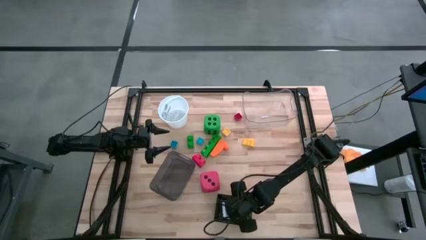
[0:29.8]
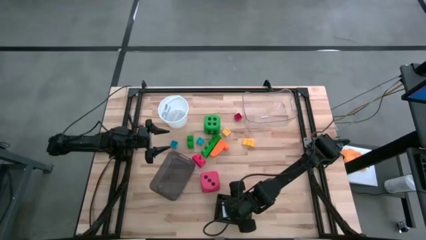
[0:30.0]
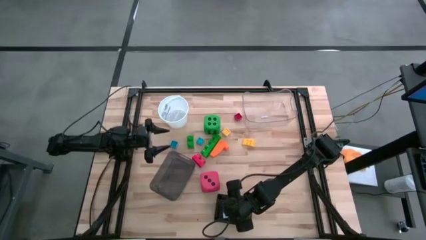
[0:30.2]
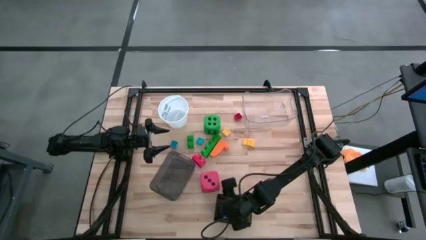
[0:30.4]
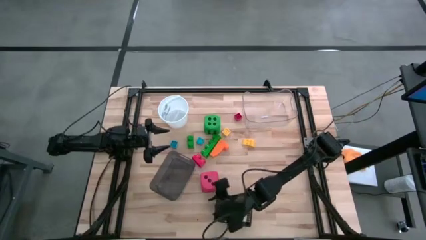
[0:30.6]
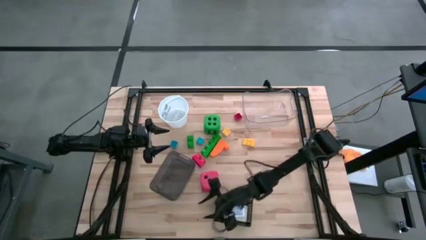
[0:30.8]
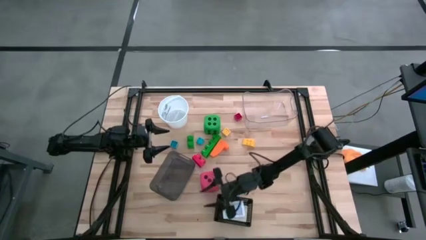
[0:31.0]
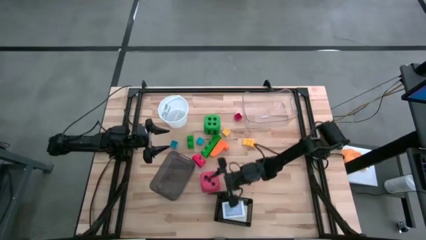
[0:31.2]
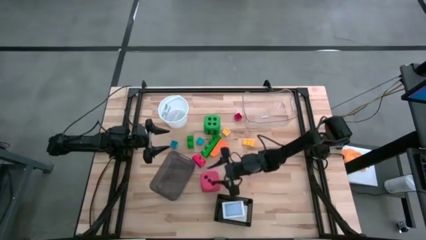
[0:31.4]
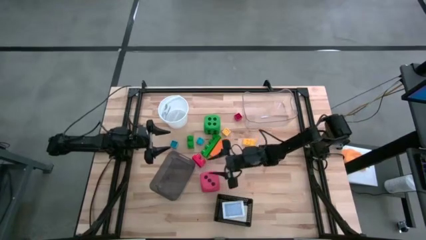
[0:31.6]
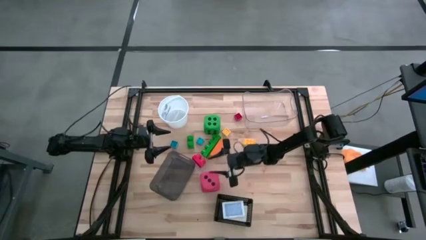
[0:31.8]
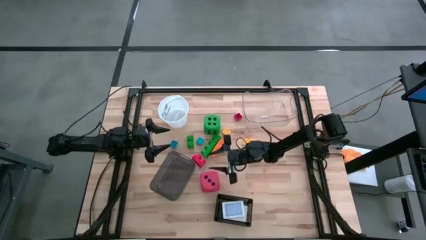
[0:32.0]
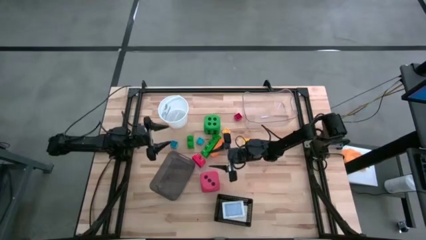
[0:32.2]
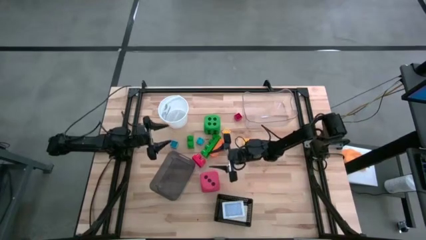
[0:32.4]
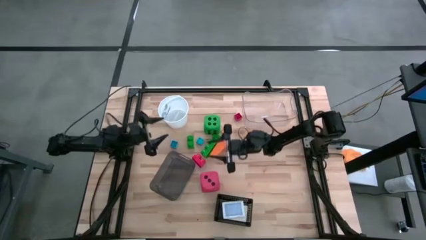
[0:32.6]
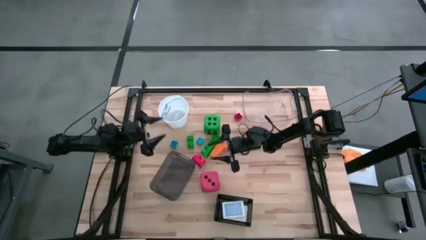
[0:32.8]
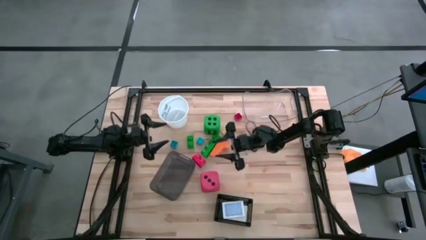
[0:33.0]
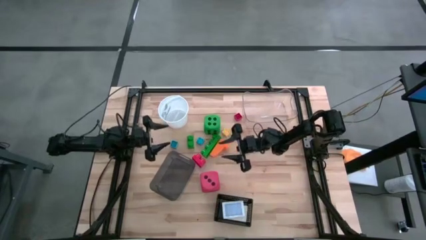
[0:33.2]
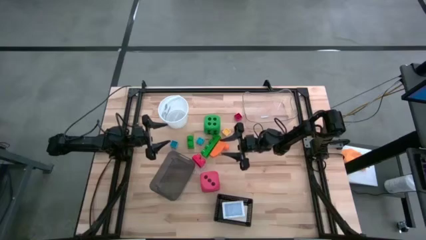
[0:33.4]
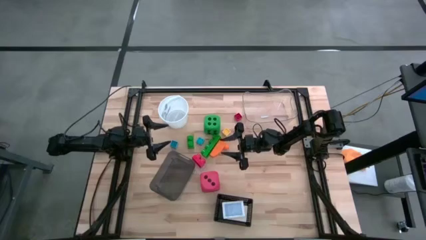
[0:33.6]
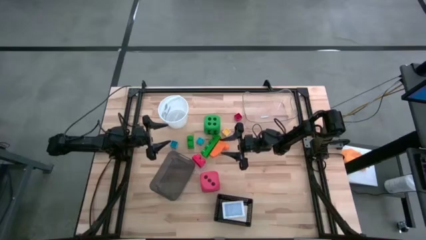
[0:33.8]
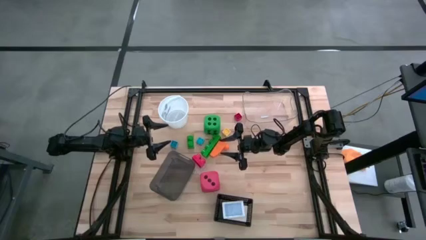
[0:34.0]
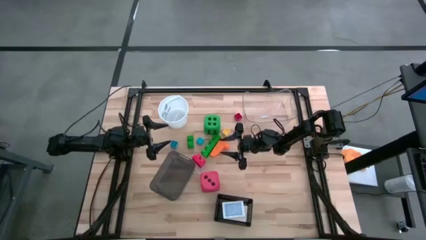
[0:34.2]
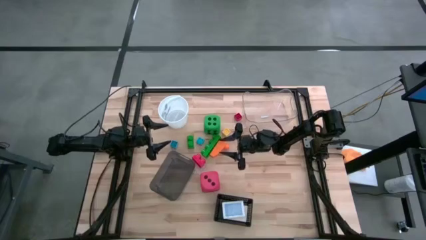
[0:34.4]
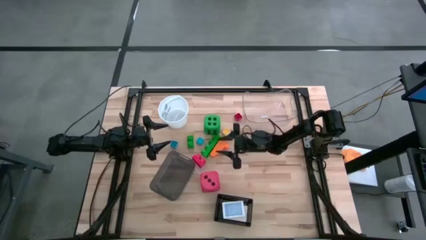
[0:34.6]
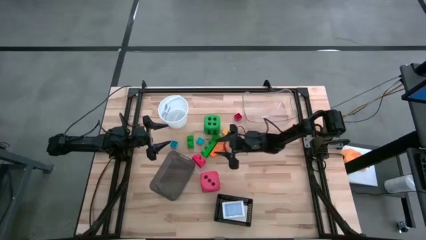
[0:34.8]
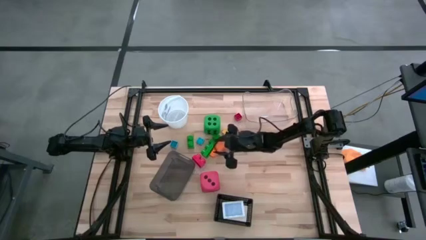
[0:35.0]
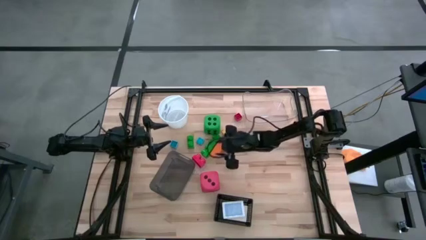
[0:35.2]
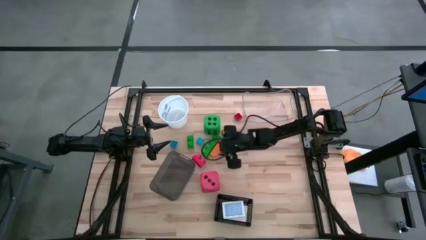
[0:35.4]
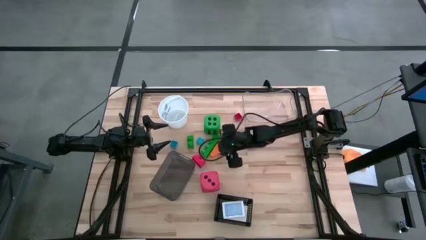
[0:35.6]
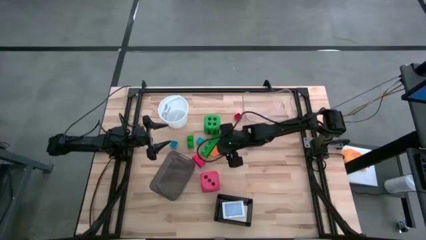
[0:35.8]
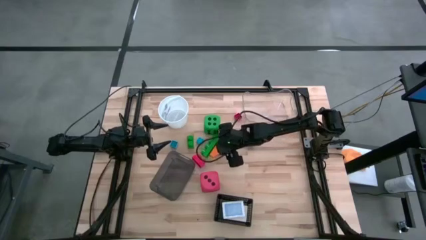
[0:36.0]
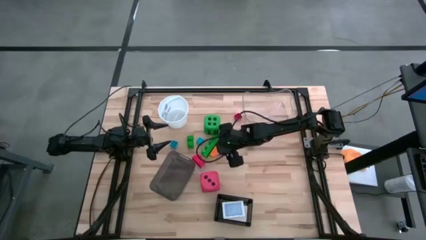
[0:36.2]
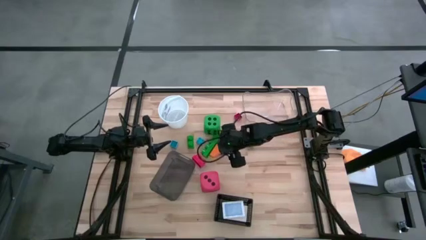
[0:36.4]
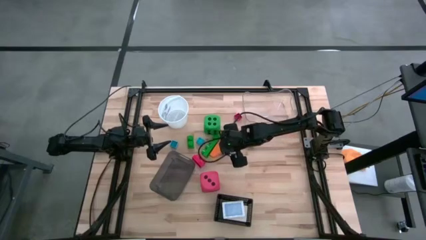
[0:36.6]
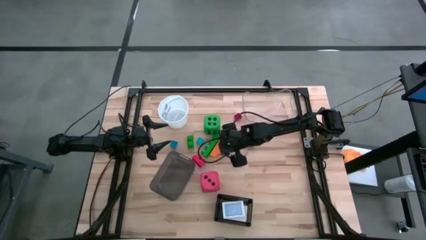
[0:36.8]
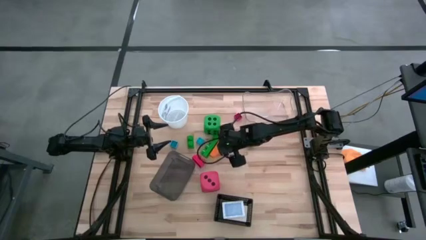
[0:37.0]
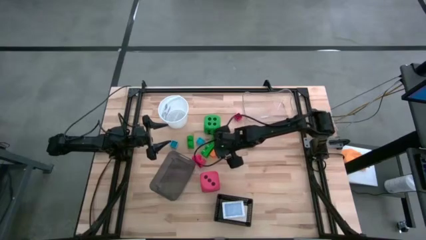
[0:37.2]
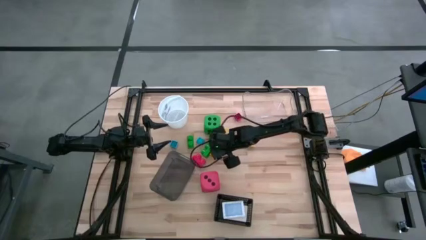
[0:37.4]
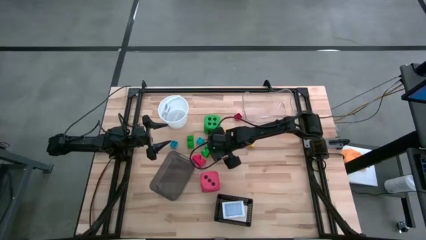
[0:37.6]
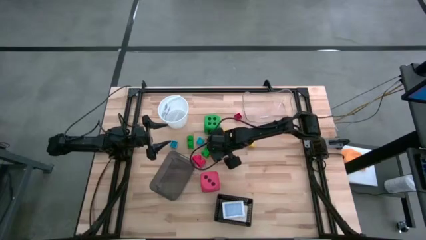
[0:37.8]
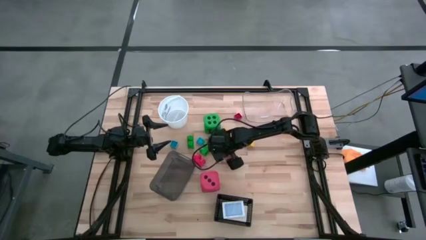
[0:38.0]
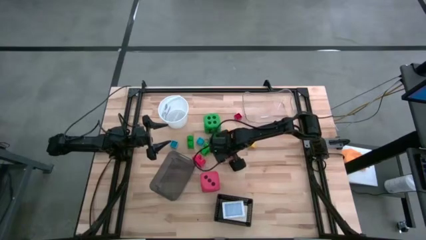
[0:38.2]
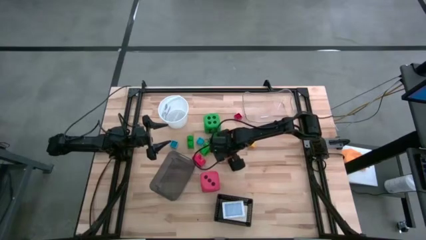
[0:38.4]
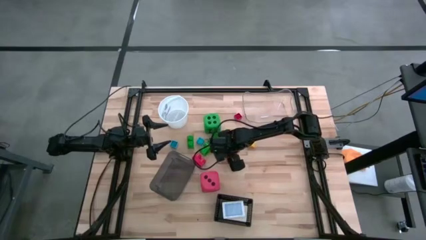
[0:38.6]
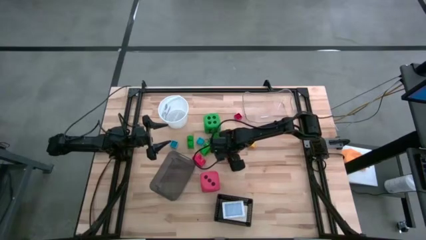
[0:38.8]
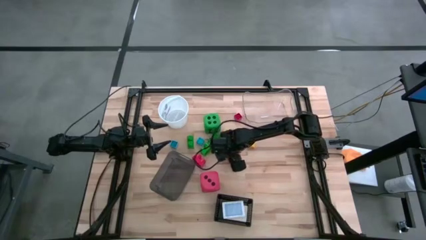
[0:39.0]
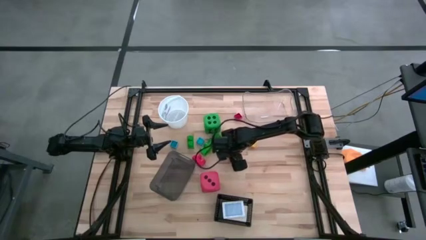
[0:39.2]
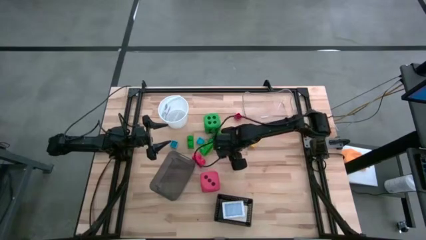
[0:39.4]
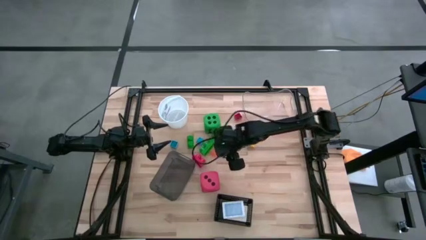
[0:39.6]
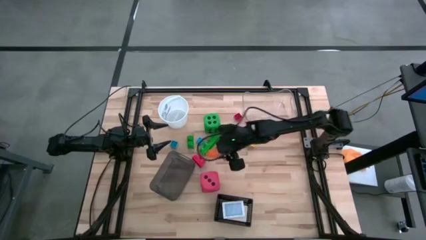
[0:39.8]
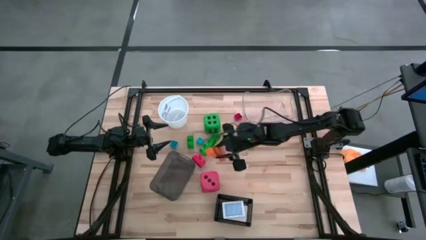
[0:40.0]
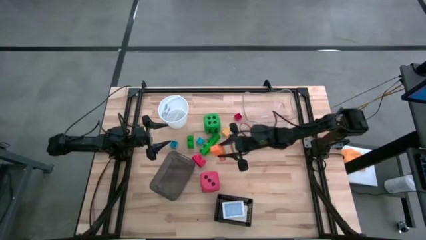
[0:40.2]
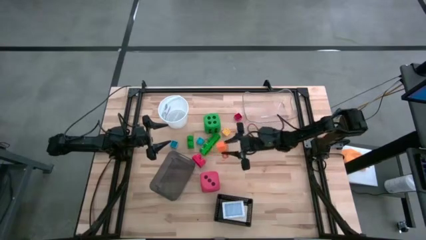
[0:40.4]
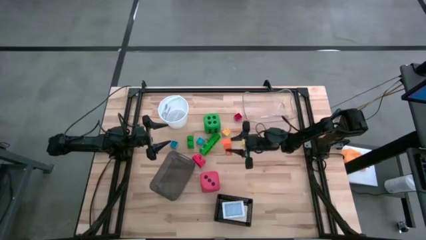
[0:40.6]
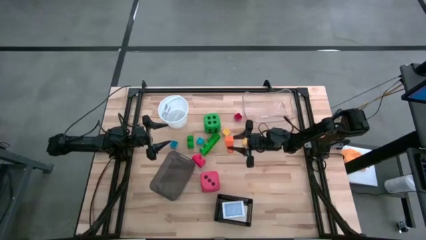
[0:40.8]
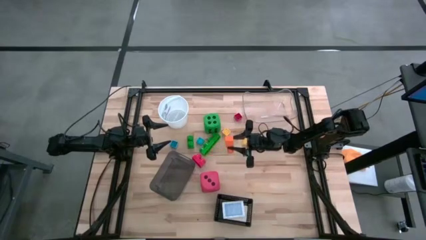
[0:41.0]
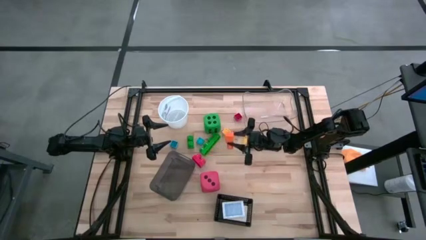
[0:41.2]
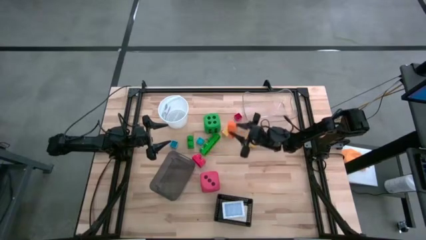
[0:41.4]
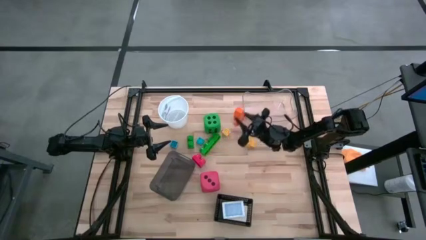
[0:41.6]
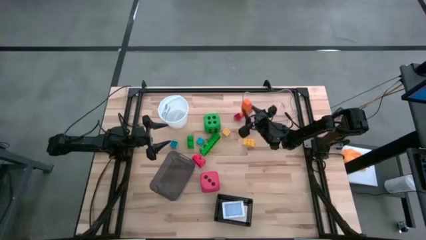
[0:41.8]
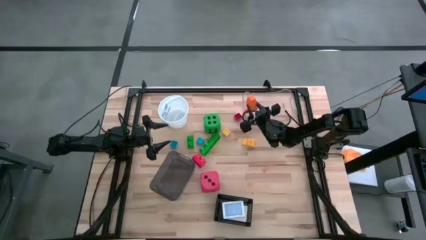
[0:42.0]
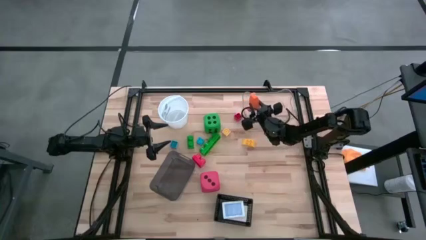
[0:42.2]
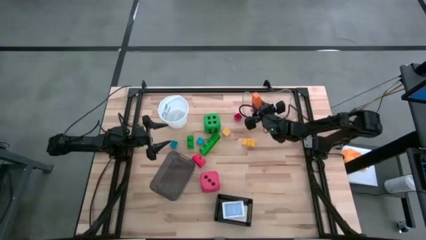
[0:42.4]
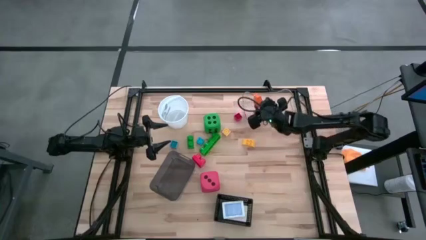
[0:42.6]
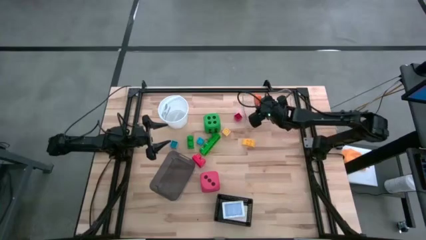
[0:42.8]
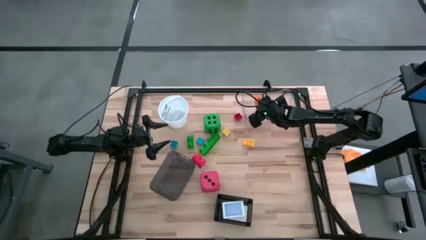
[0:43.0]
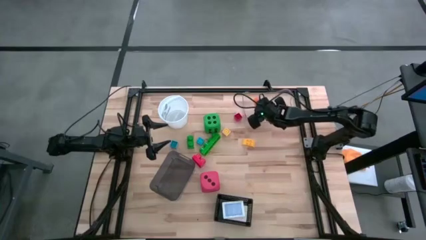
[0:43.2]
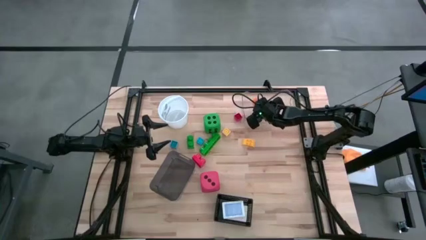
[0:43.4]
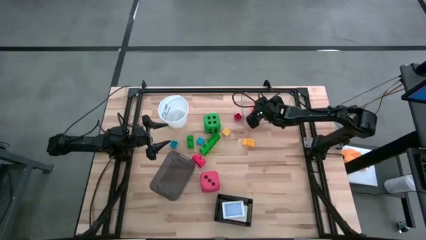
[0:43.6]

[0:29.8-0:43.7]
Task: Pick & Place Toys
Put the orange game piece into the transparent bin

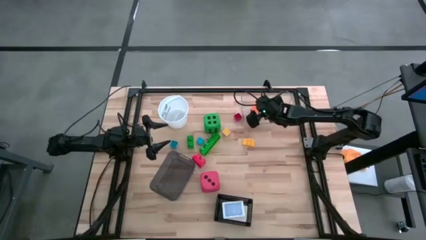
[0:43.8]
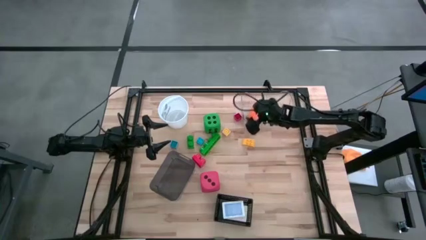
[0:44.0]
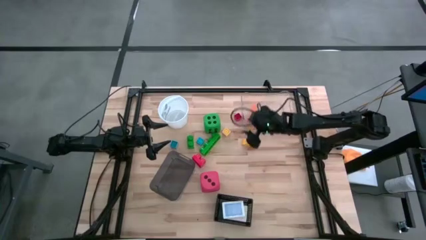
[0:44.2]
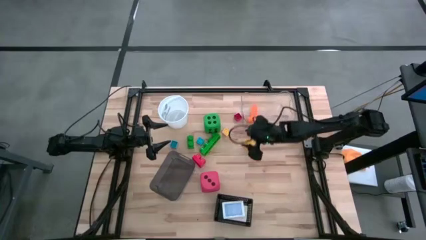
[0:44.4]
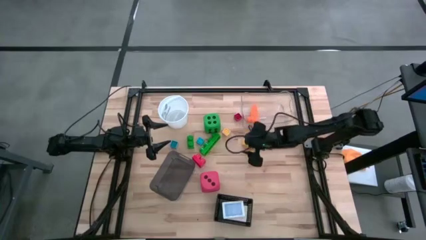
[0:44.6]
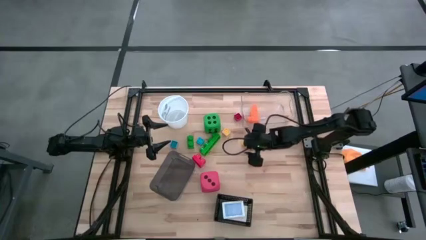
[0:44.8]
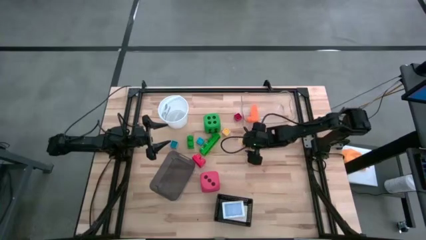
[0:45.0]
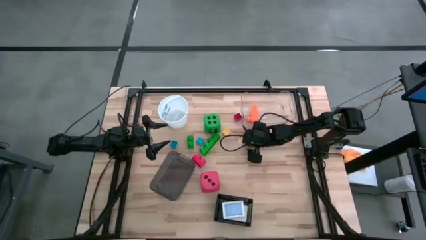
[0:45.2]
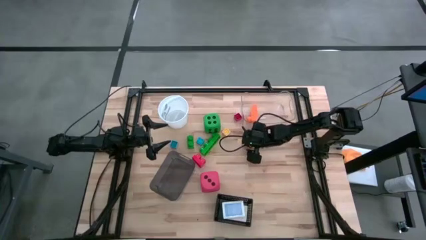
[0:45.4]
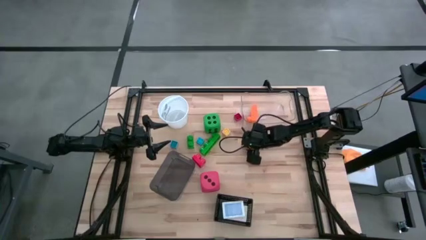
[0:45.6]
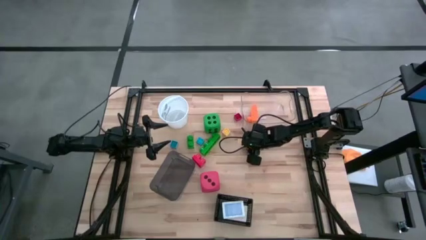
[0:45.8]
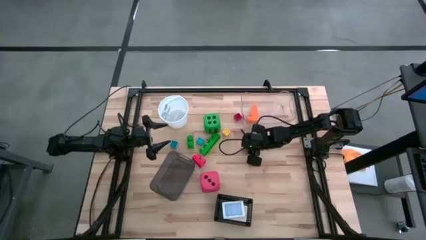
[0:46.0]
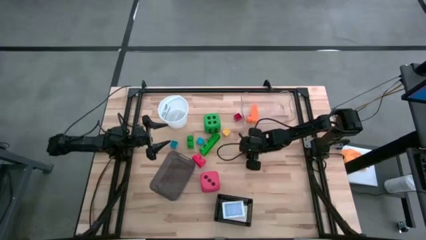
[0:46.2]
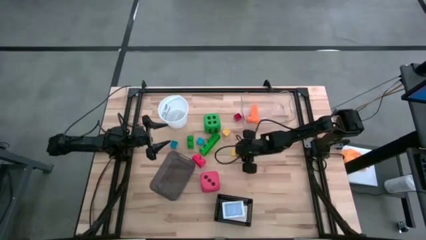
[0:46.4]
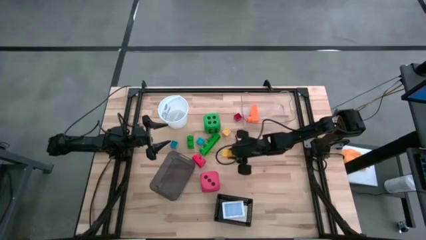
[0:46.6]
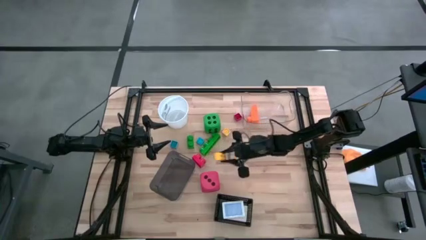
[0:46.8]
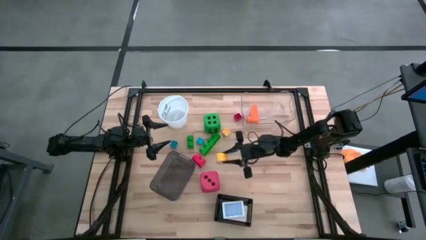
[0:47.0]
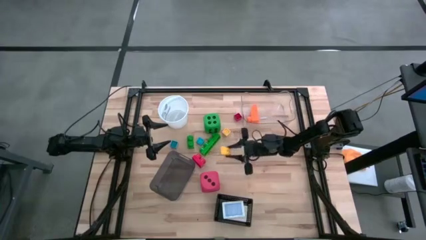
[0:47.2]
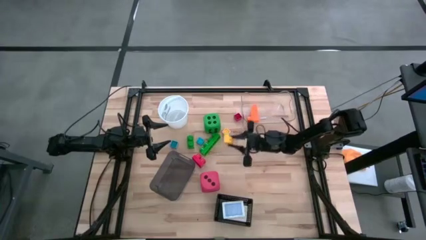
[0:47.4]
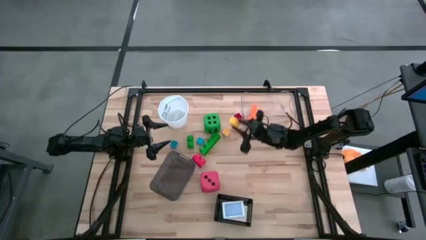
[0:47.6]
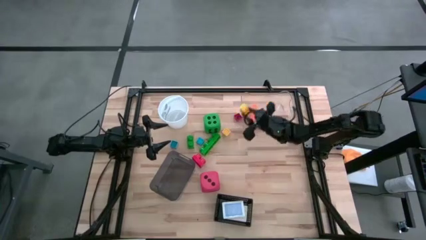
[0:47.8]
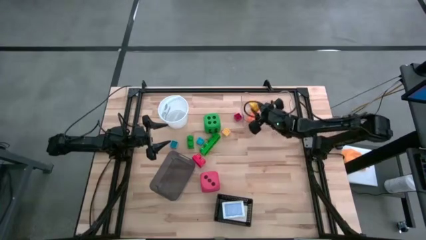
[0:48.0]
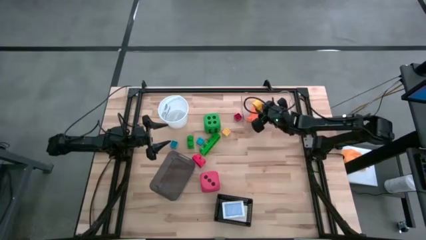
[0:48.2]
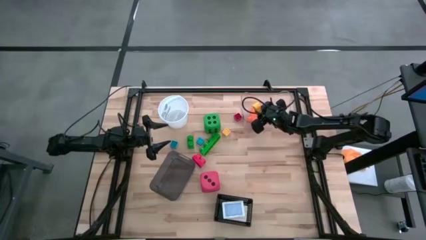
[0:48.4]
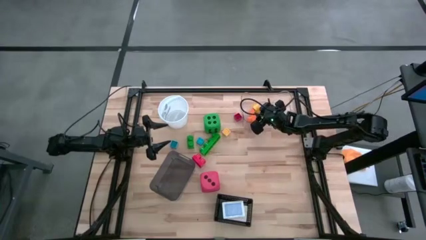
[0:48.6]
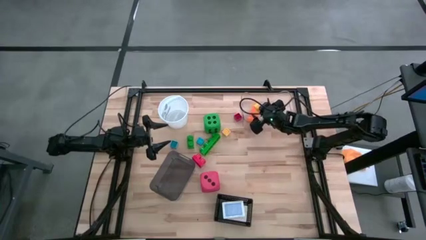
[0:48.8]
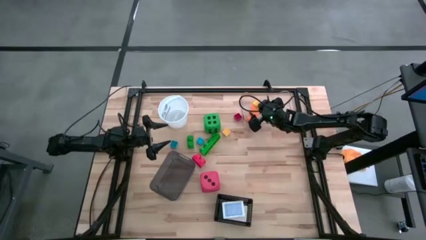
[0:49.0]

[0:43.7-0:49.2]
Put the right yellow game piece into the transparent bin
